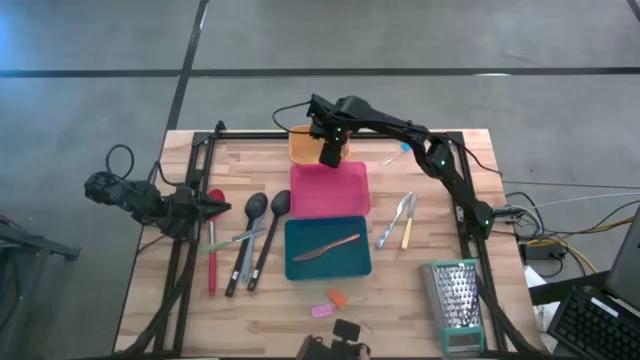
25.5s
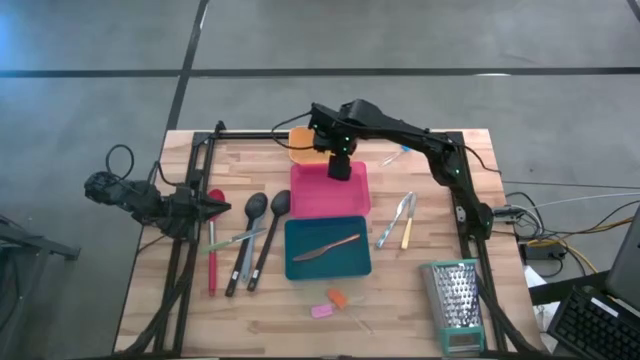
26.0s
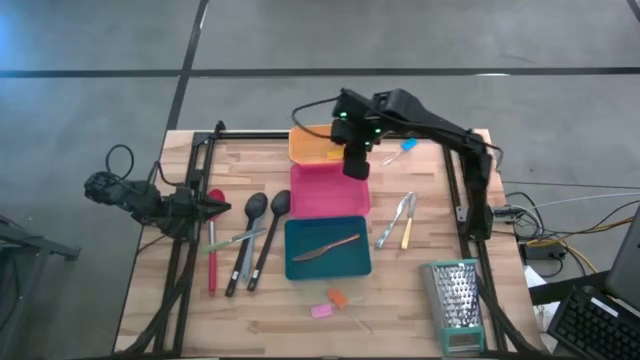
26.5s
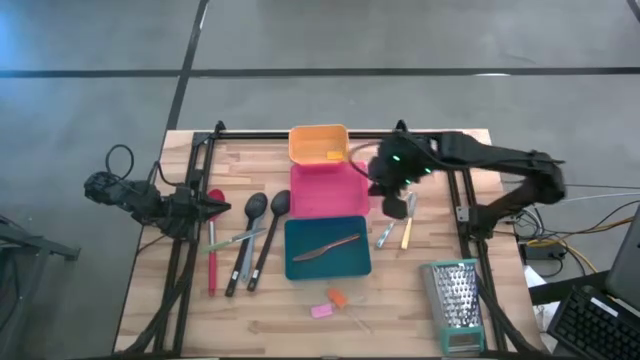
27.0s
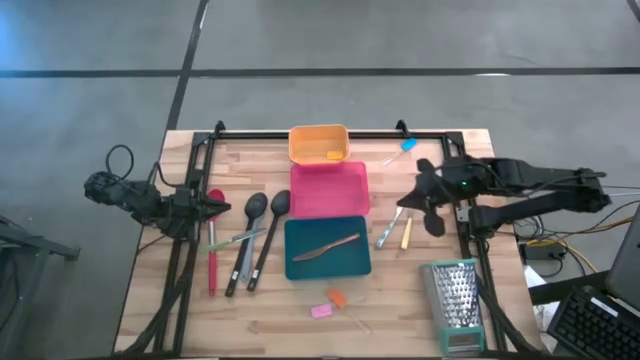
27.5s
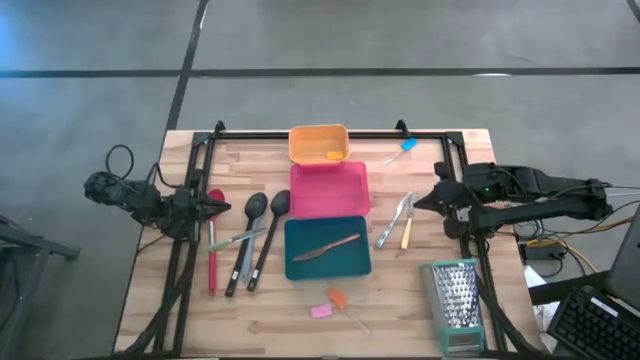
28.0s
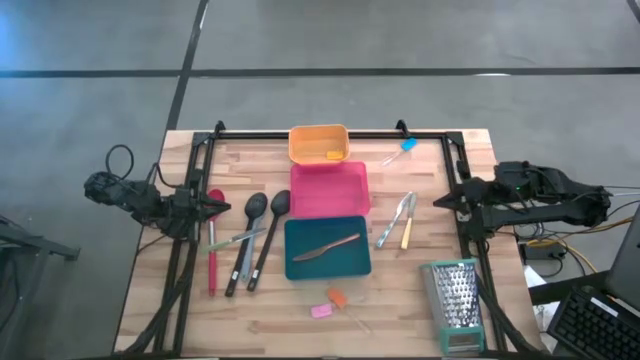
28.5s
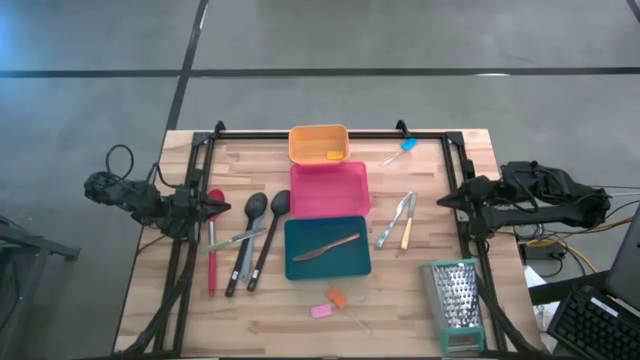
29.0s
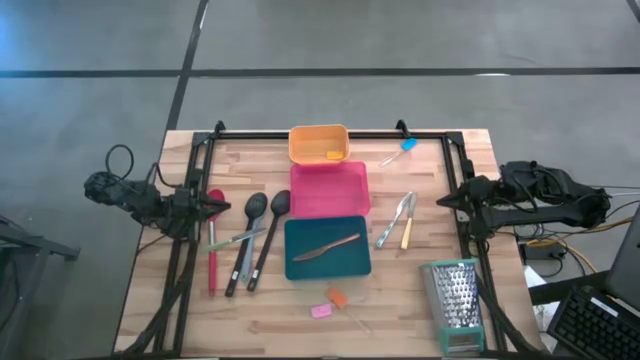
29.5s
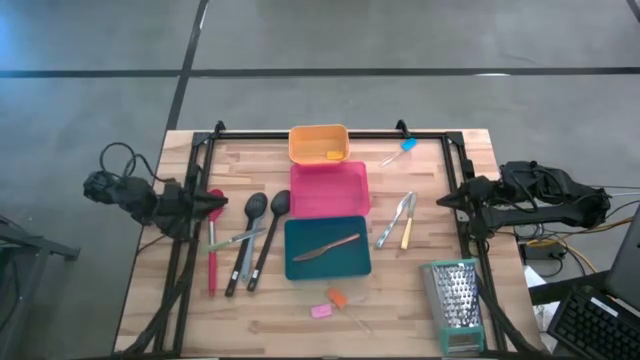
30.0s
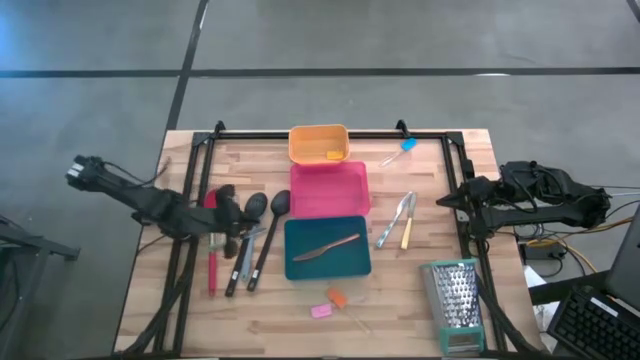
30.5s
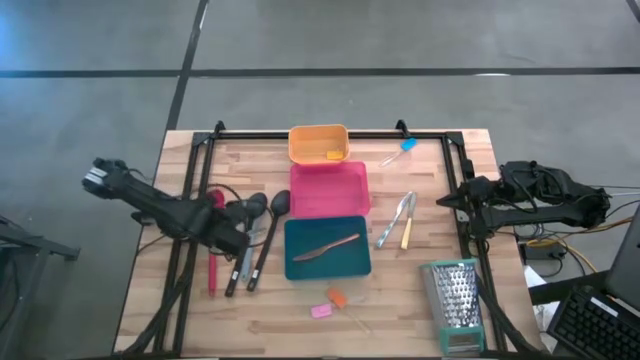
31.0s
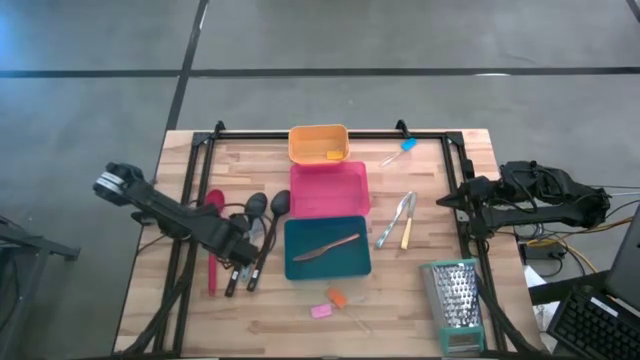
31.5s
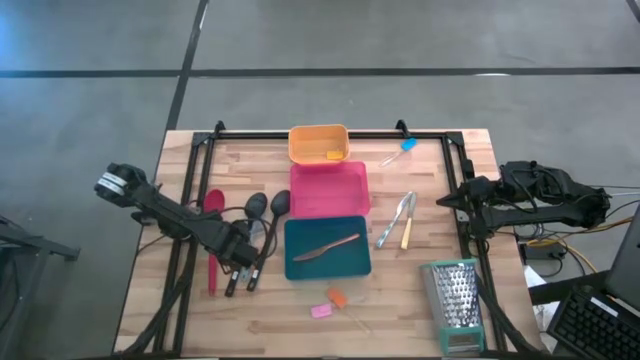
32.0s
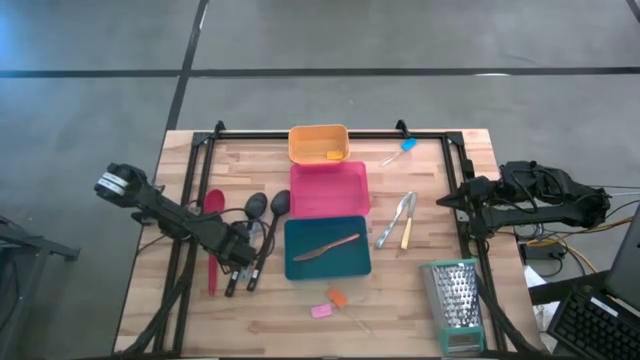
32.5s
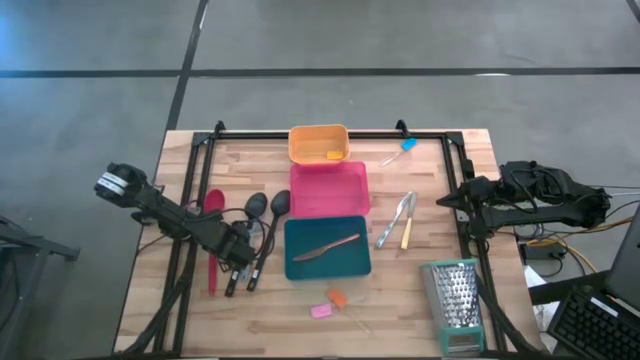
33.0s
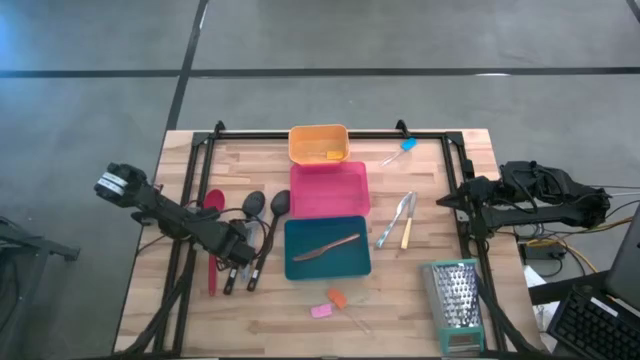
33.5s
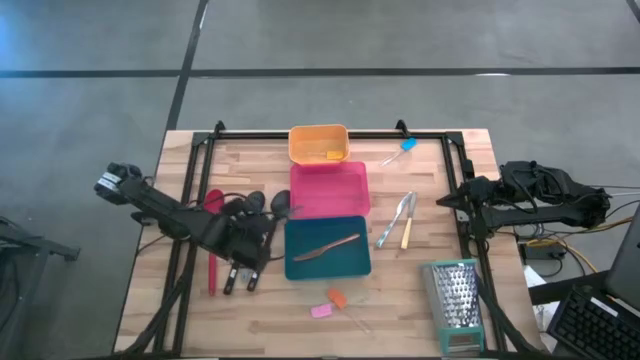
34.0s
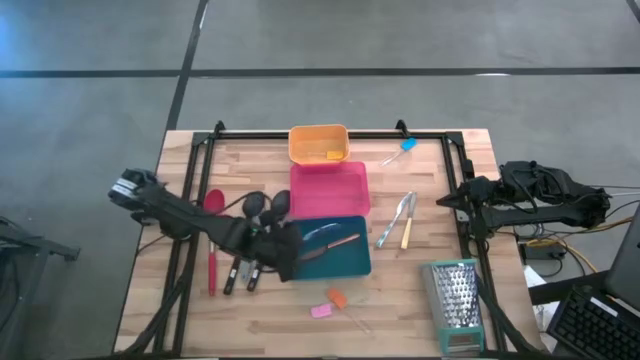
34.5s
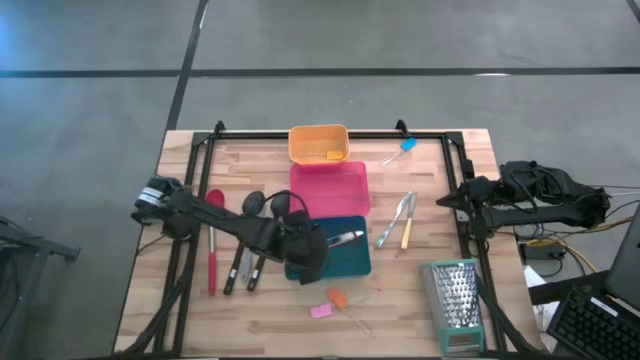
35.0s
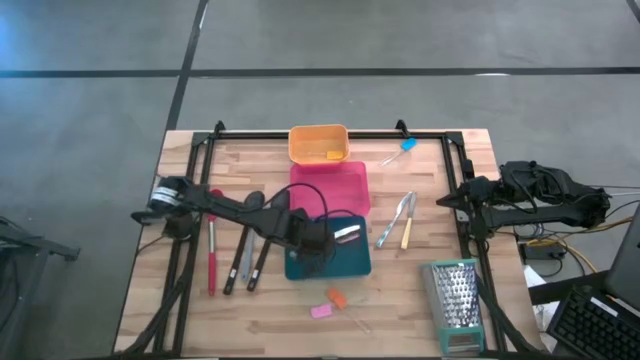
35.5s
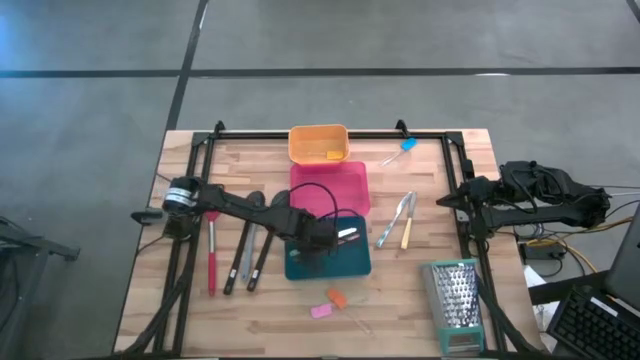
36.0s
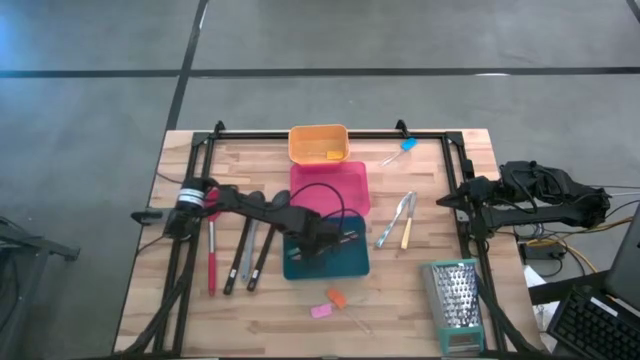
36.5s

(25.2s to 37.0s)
Task: Pick & Place Kitchen Items
Put the light green knife into the blue bin

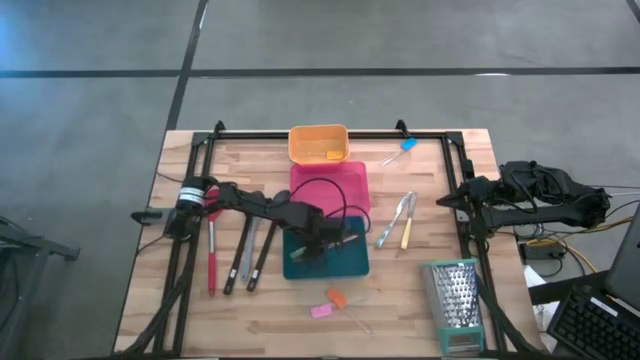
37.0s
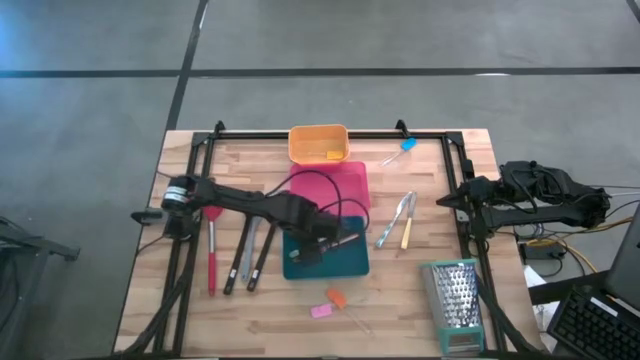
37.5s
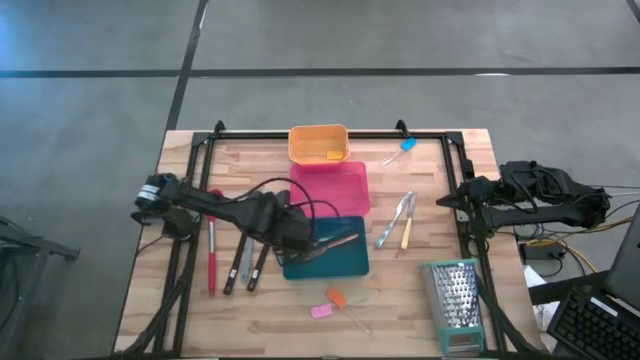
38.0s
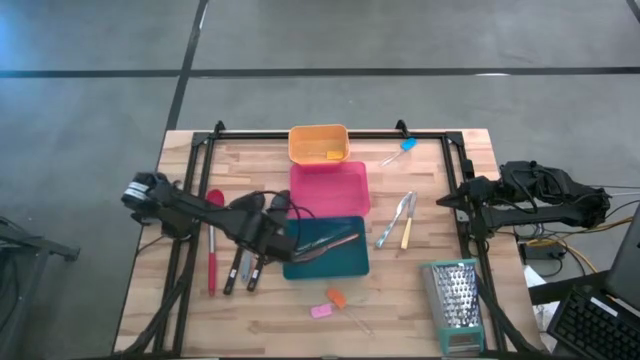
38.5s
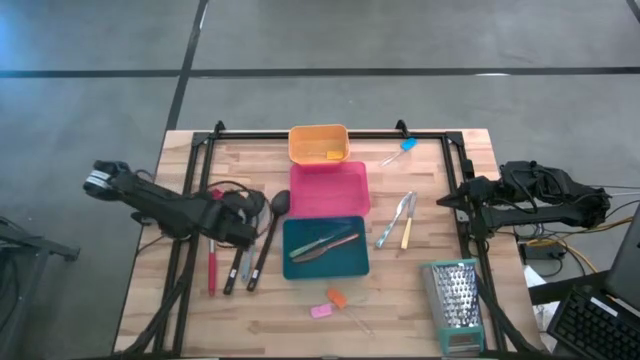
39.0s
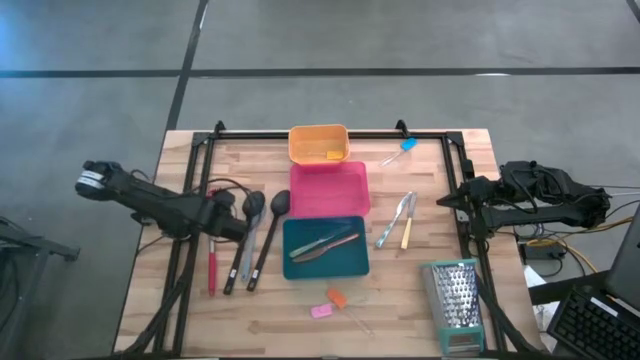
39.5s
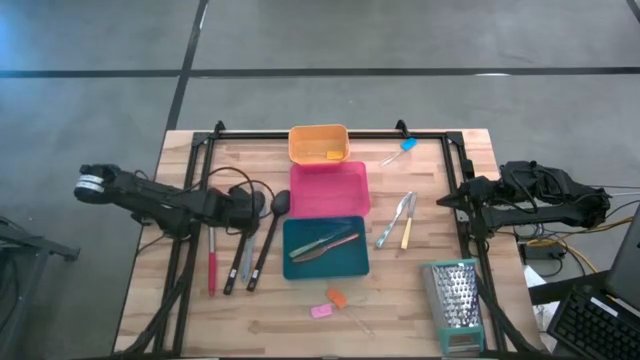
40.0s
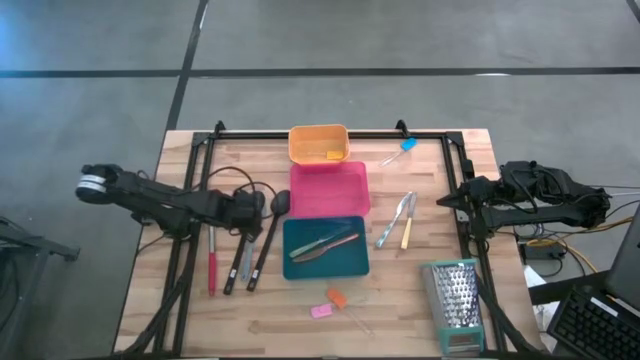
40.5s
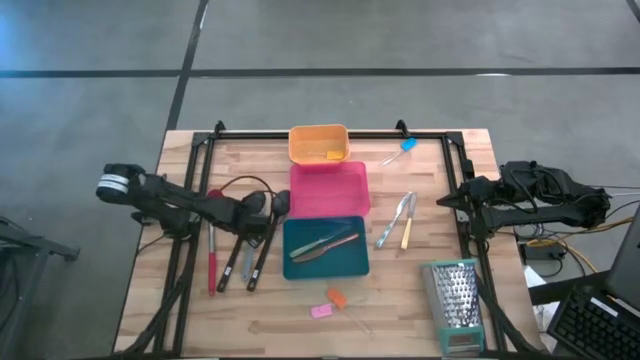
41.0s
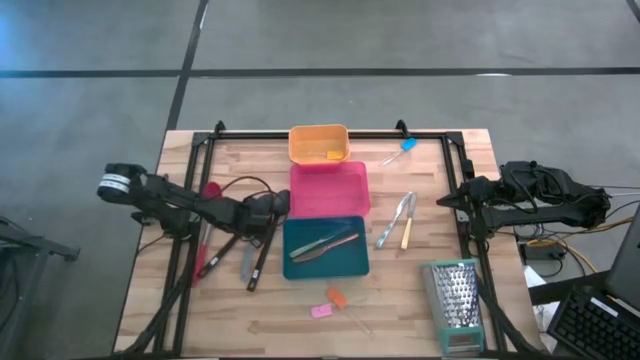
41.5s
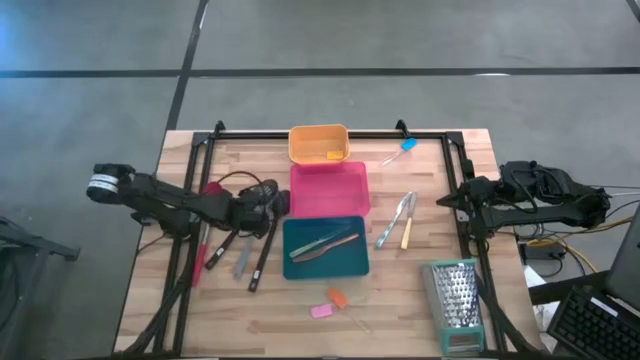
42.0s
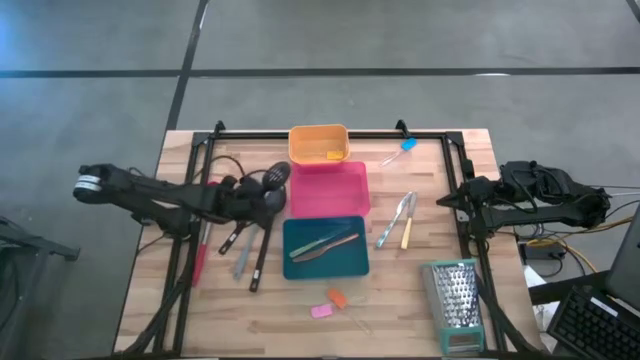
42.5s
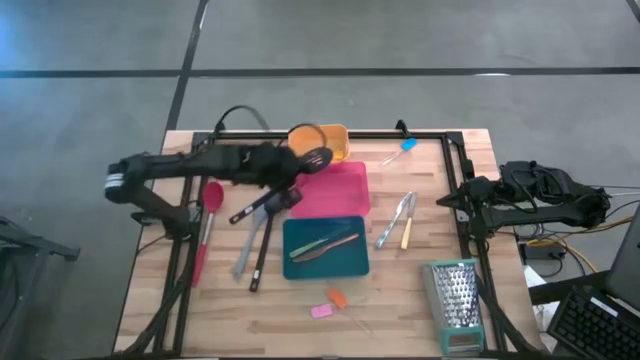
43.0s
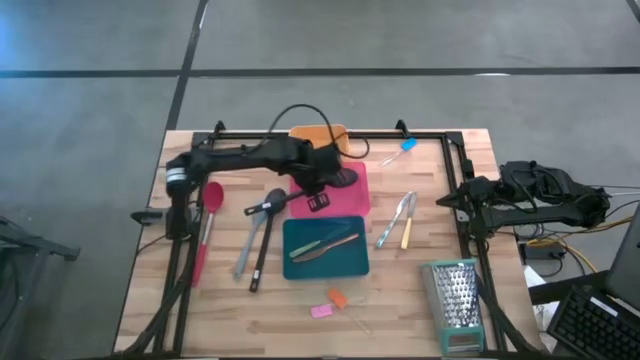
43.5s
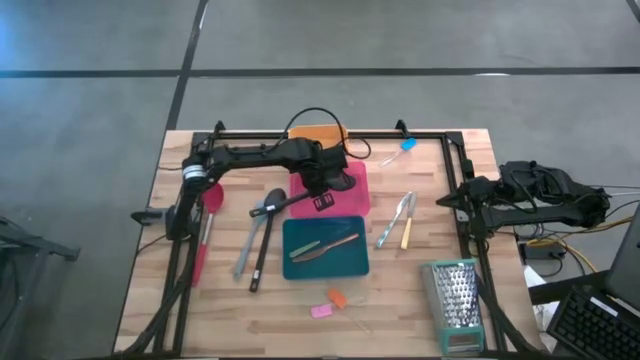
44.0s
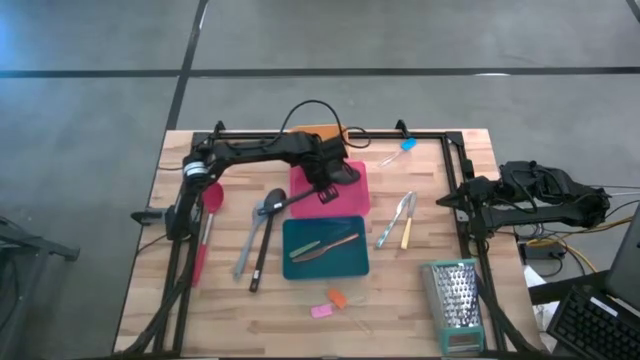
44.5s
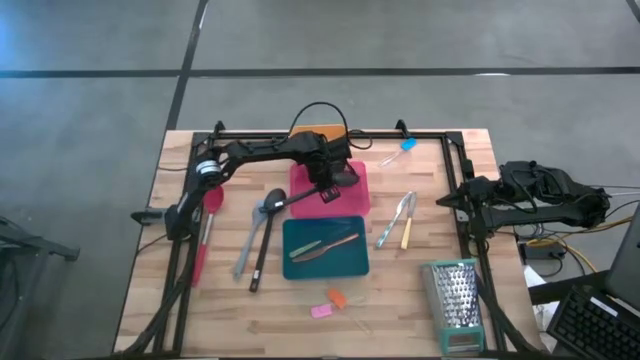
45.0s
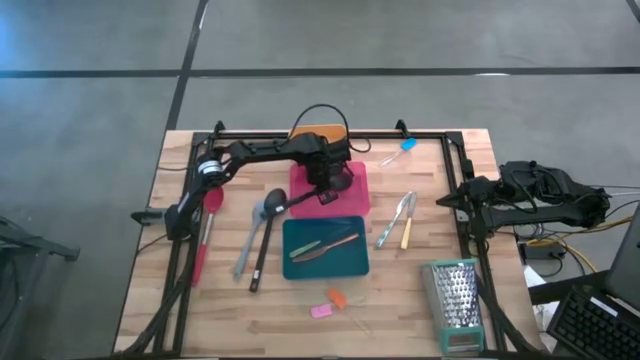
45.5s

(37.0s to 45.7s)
Put the left black serving spoon into the pink bin

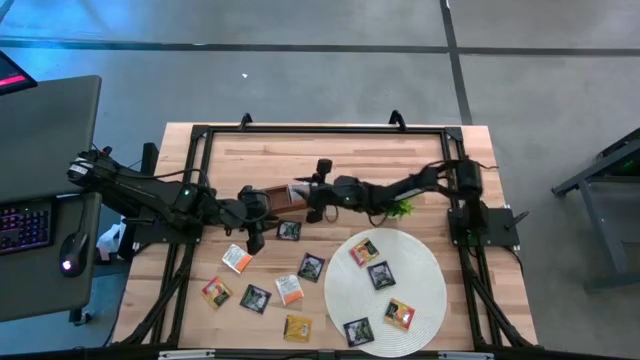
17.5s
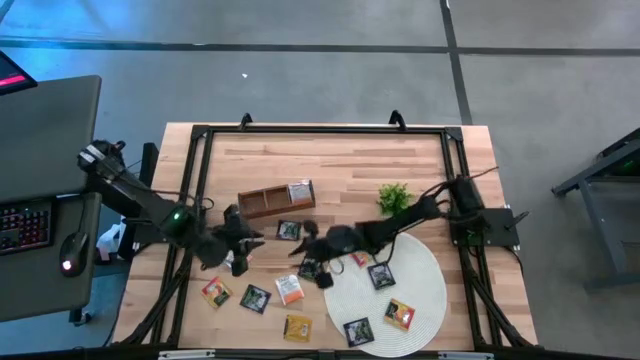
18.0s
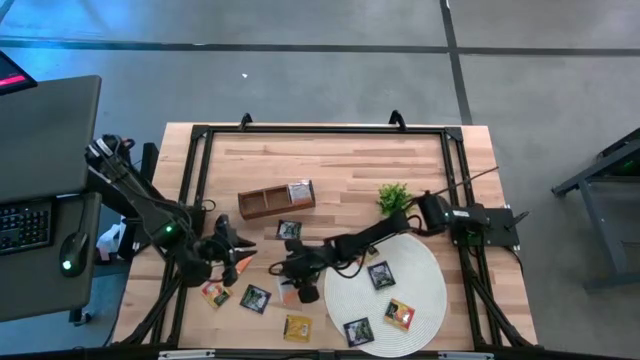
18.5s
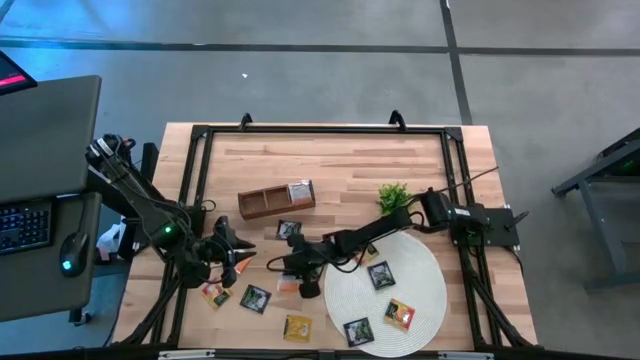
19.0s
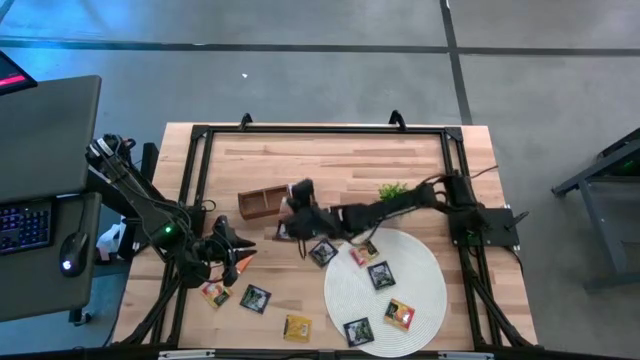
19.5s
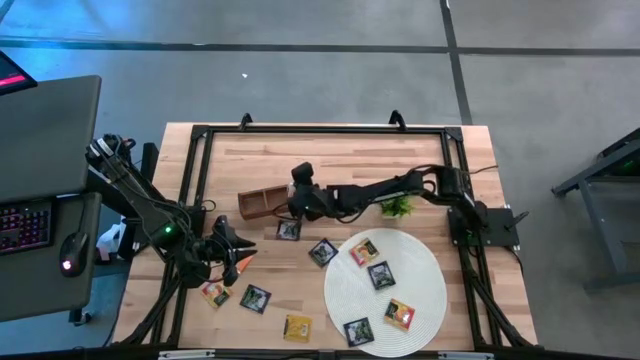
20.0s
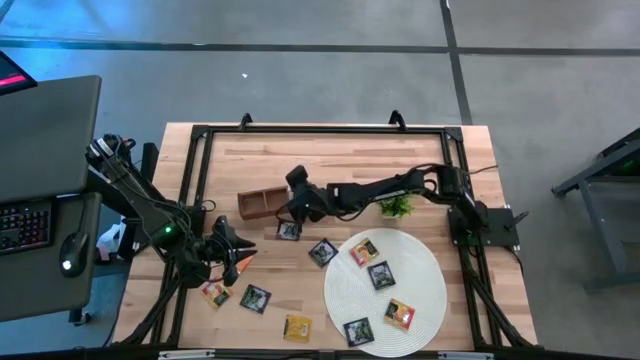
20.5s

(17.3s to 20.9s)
Task: Pick & Place Tea
Put the white tea bag into the right section of the wooden organizer
